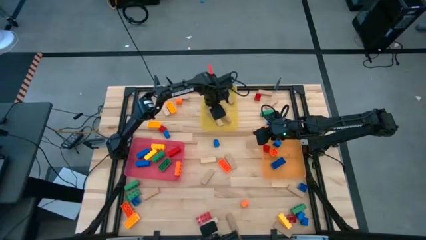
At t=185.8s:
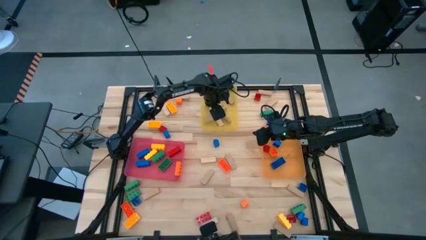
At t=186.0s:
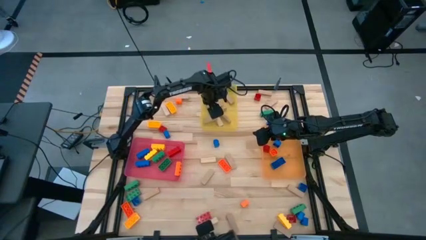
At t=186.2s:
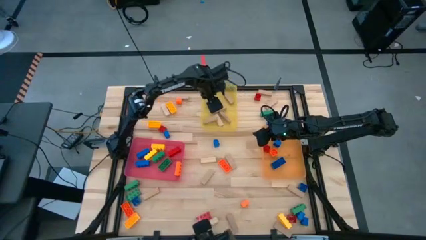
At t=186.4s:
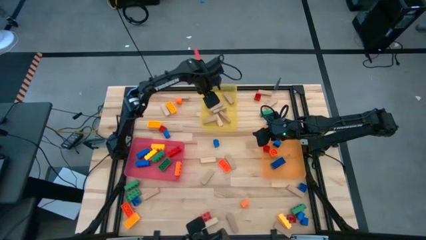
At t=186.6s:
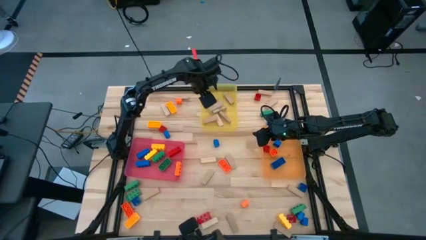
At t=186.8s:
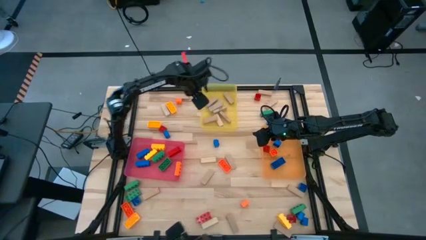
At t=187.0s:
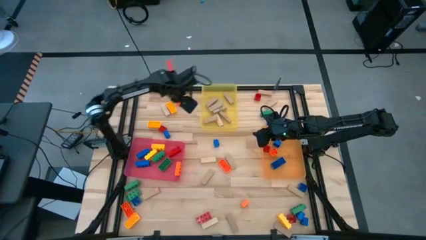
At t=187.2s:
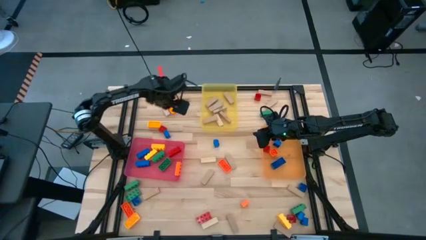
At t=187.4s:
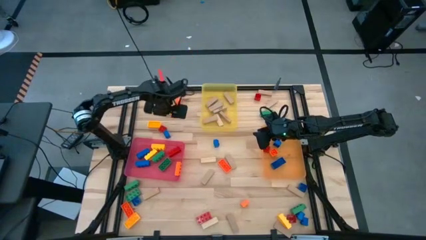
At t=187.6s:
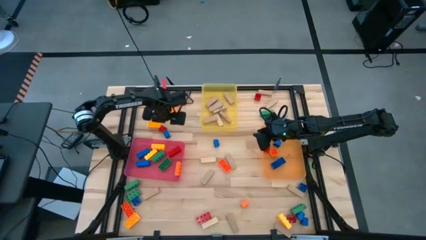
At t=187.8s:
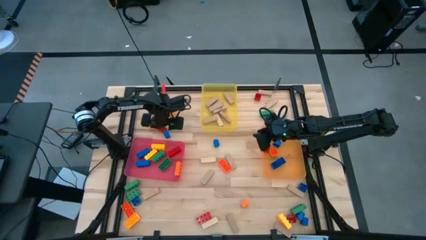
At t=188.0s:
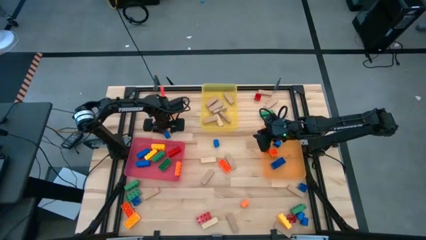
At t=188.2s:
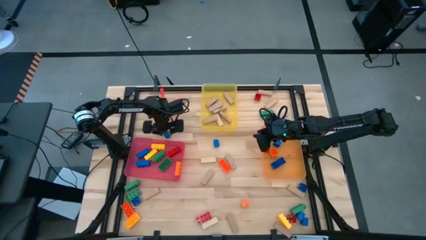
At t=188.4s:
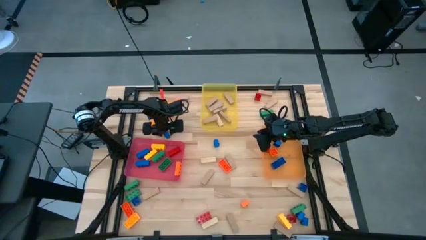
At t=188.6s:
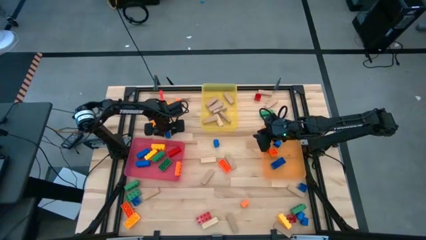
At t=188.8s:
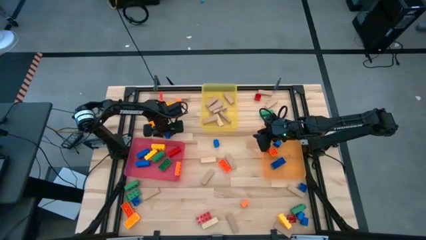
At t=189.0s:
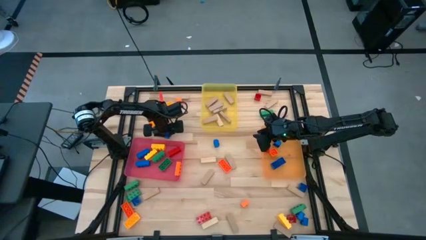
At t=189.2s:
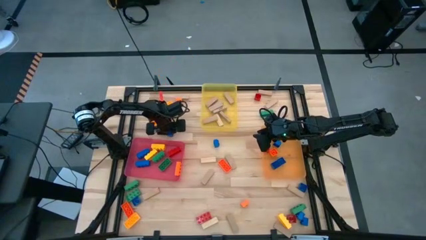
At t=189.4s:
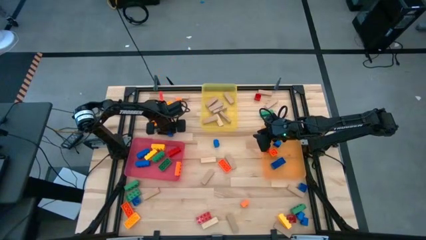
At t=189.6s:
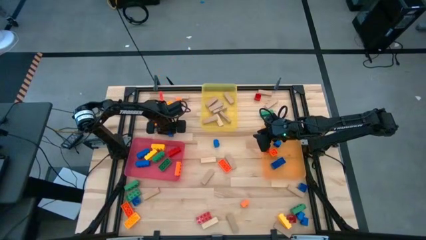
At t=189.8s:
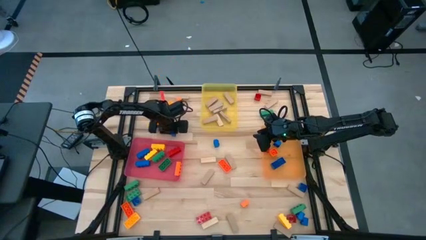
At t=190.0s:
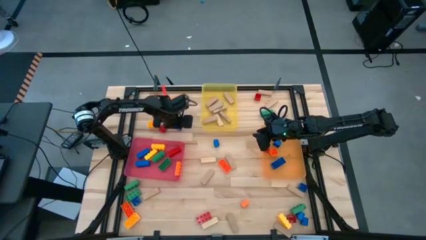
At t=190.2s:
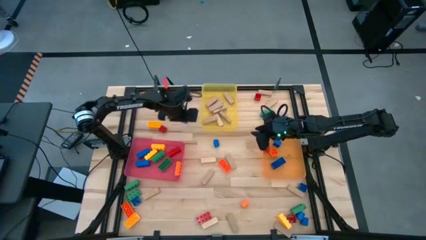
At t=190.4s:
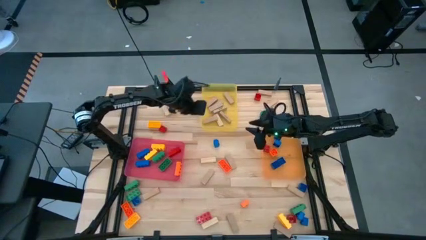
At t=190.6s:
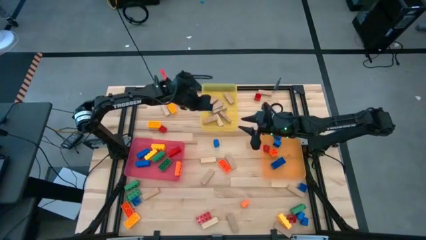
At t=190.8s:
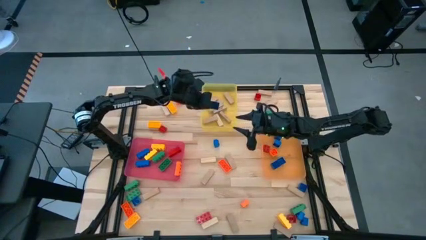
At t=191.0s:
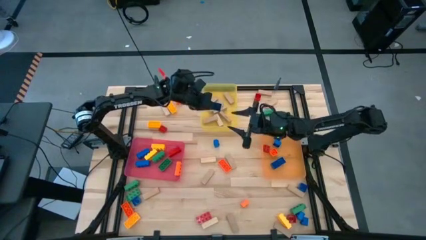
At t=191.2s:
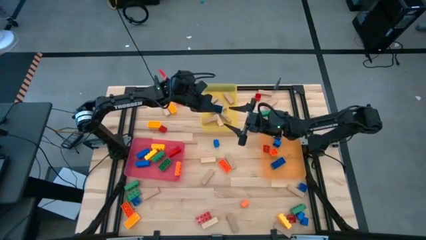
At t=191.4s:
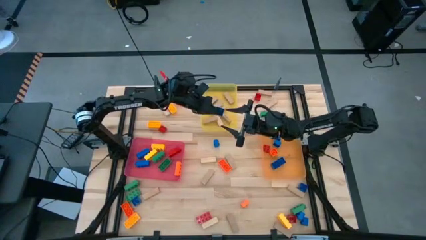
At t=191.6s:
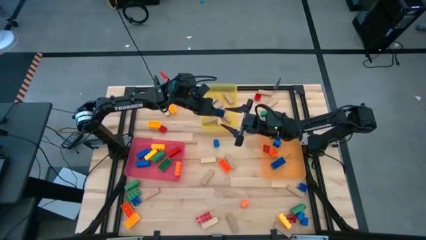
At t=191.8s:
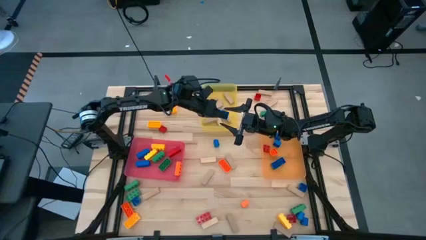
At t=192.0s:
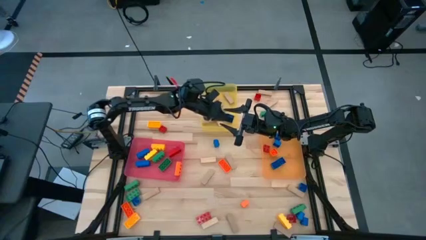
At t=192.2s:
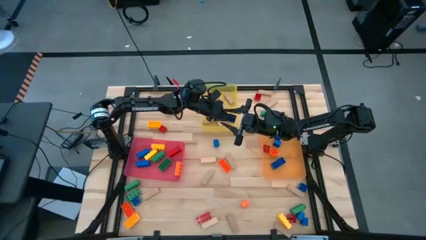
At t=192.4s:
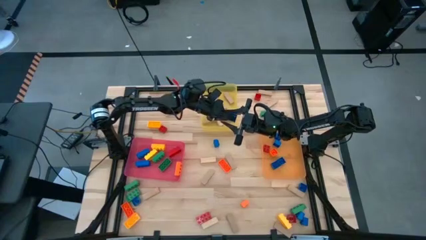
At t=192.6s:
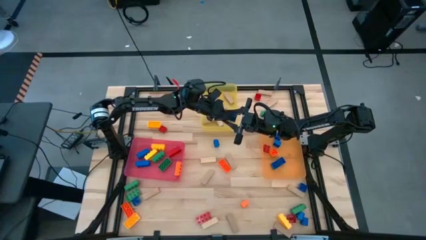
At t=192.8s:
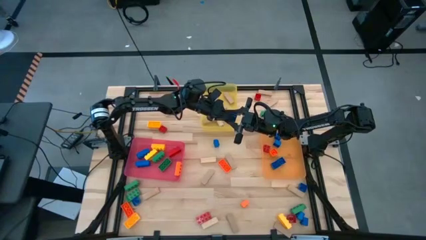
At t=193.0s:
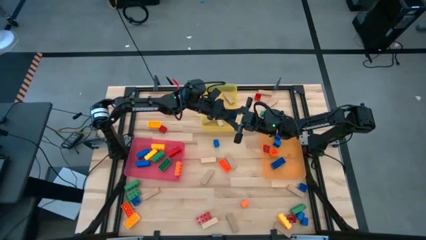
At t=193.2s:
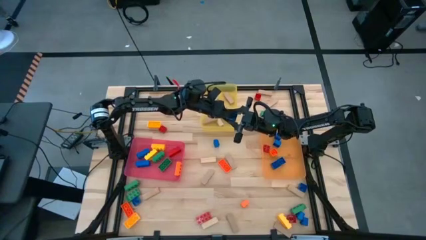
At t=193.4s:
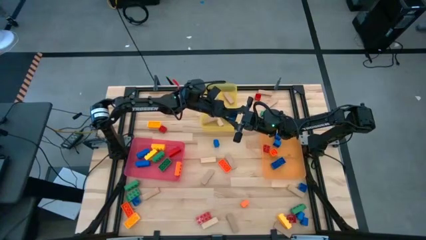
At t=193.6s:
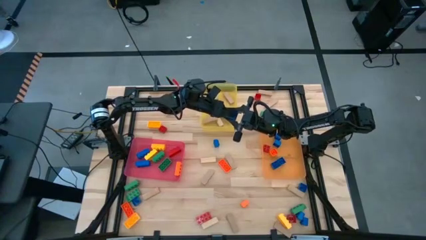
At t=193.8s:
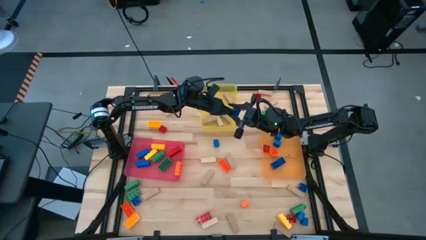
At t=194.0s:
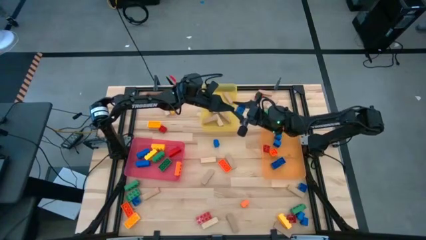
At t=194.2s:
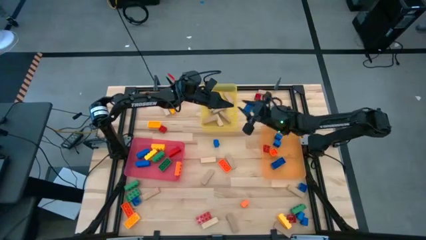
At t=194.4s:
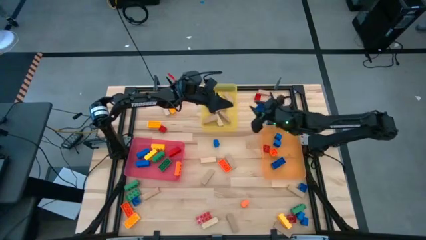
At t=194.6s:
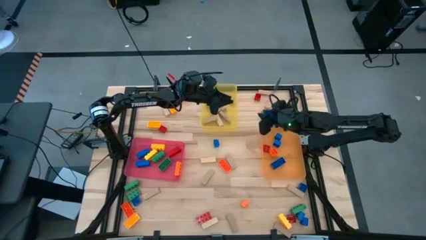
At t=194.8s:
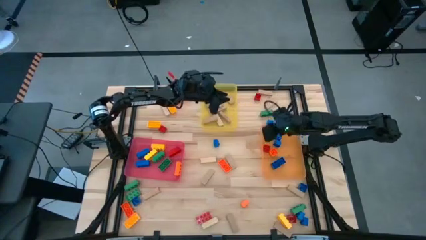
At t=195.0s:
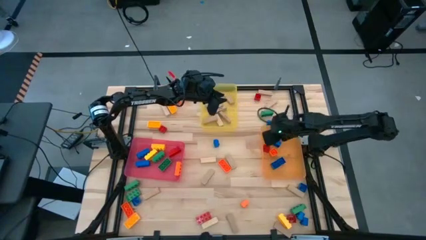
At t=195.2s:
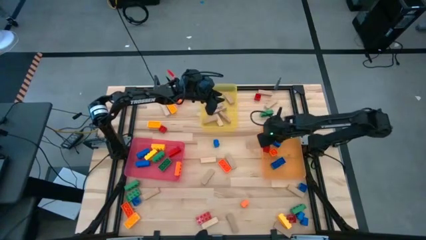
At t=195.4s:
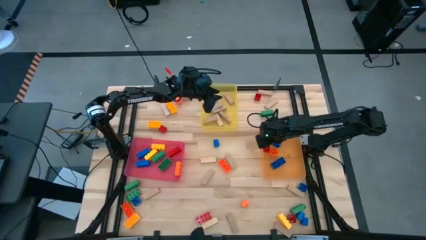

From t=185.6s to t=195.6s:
Task: Sort blocks by size
Put the 1 stud blue game piece into the orange bin

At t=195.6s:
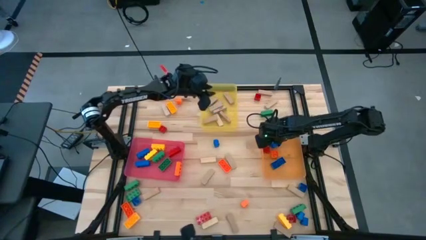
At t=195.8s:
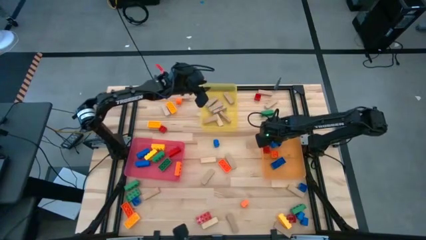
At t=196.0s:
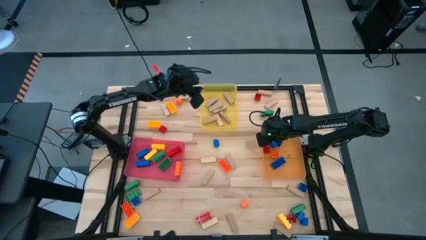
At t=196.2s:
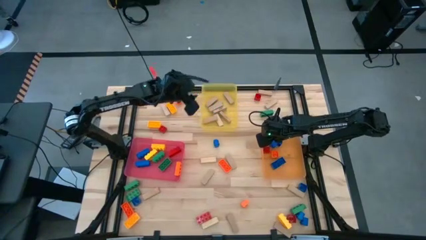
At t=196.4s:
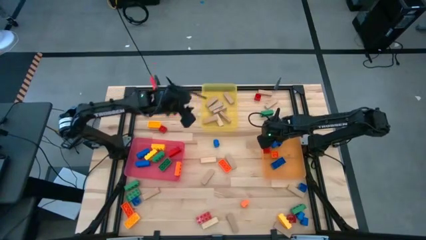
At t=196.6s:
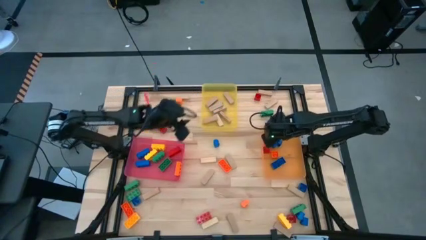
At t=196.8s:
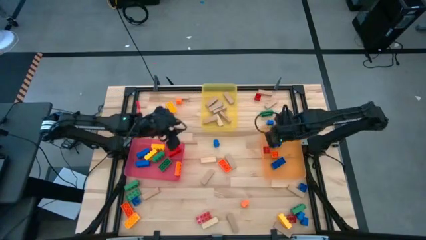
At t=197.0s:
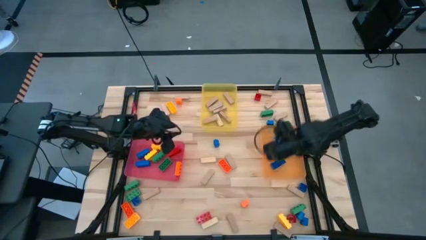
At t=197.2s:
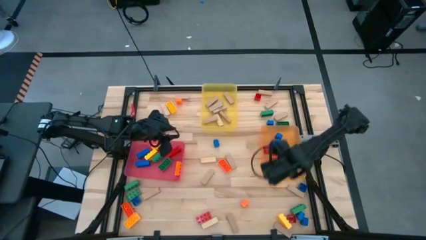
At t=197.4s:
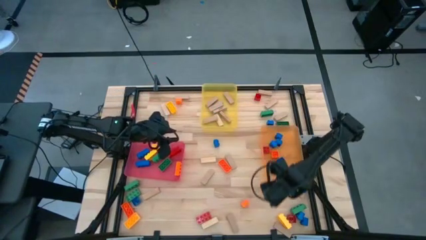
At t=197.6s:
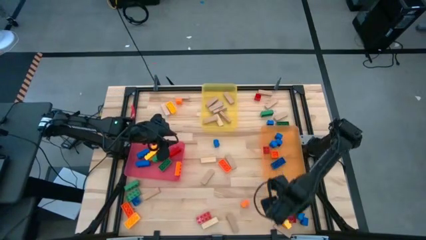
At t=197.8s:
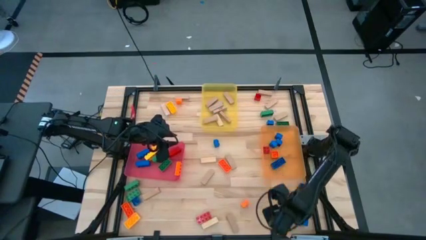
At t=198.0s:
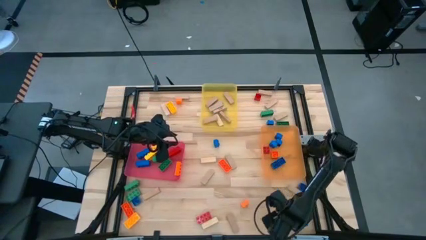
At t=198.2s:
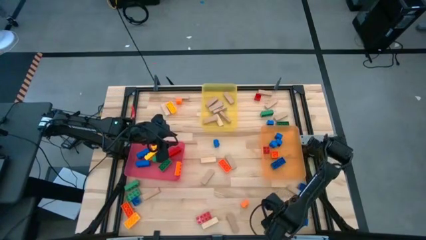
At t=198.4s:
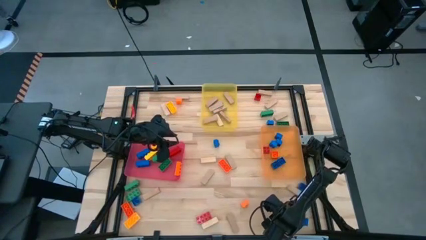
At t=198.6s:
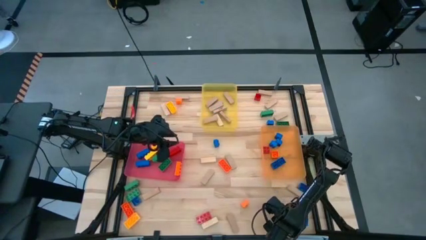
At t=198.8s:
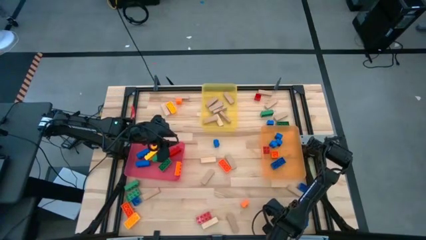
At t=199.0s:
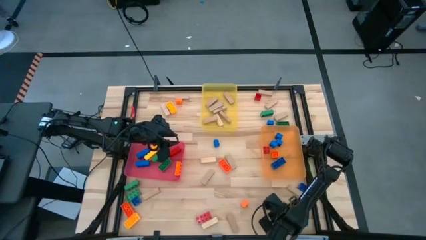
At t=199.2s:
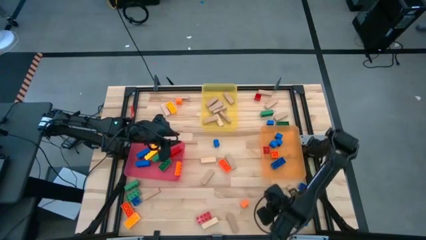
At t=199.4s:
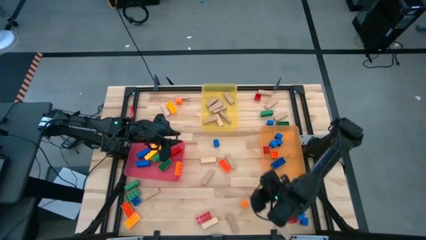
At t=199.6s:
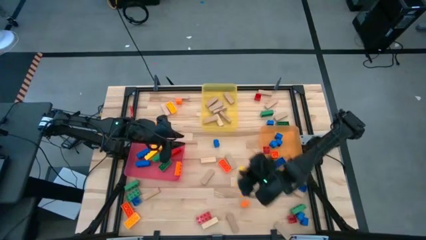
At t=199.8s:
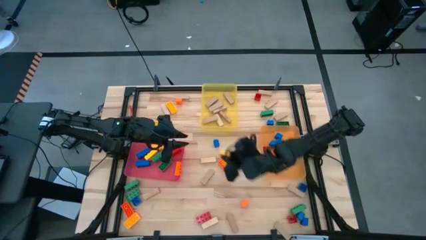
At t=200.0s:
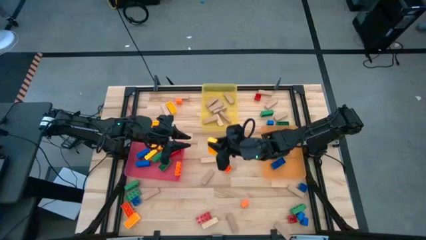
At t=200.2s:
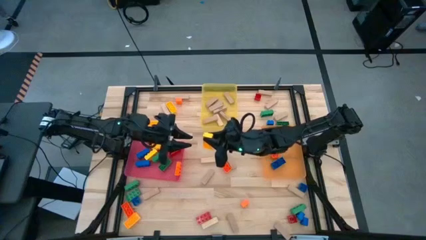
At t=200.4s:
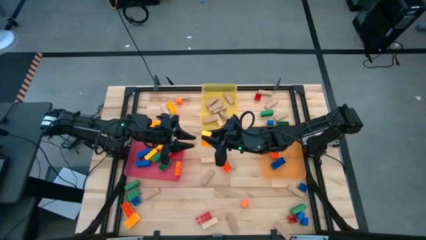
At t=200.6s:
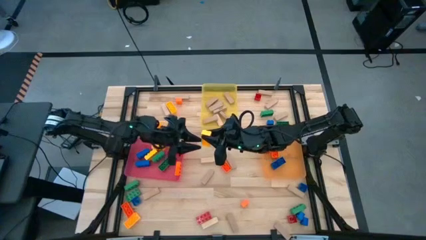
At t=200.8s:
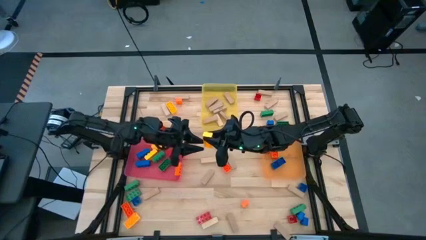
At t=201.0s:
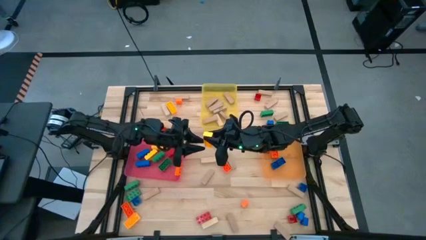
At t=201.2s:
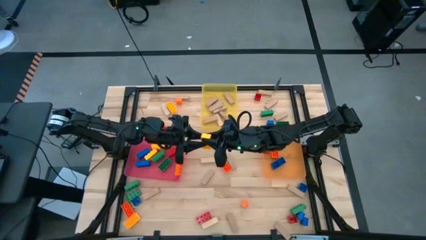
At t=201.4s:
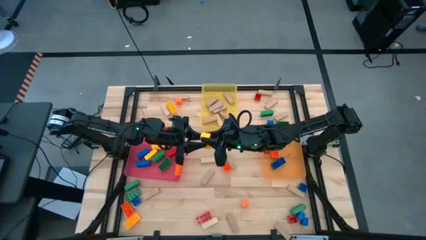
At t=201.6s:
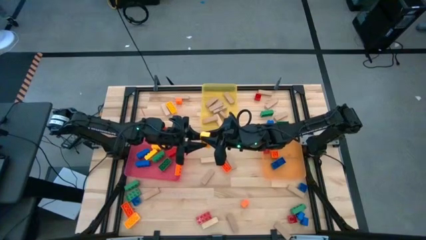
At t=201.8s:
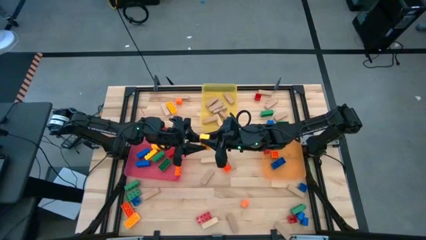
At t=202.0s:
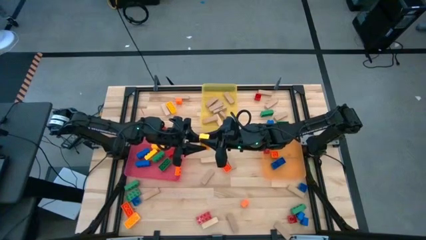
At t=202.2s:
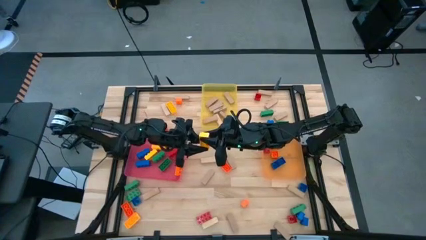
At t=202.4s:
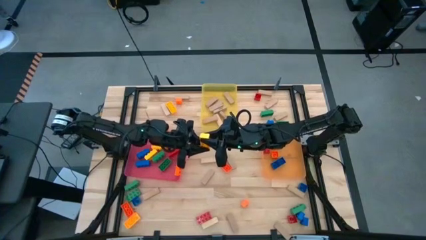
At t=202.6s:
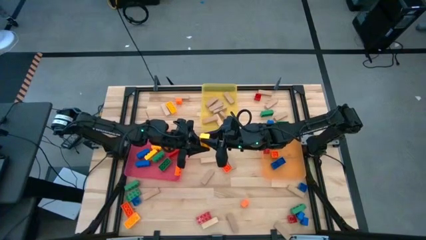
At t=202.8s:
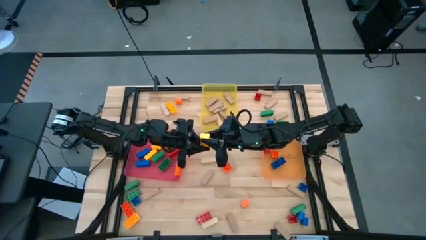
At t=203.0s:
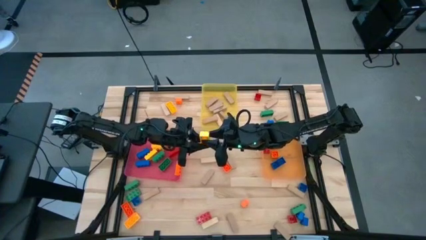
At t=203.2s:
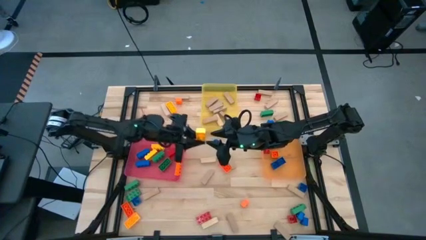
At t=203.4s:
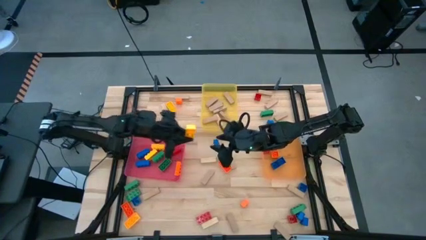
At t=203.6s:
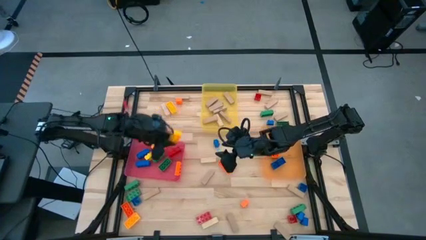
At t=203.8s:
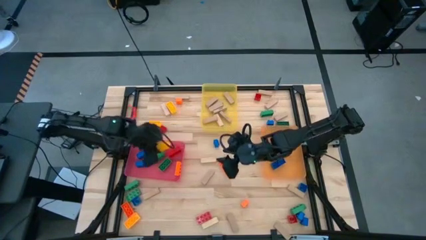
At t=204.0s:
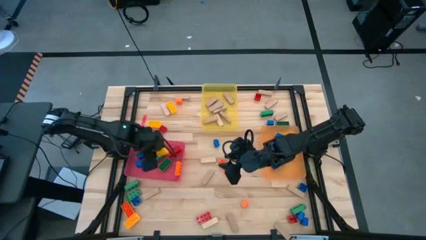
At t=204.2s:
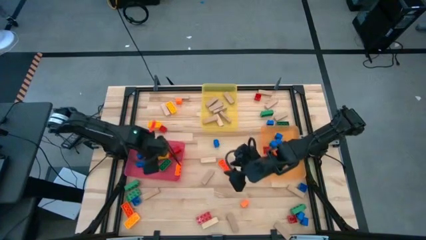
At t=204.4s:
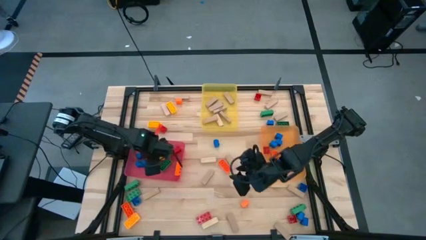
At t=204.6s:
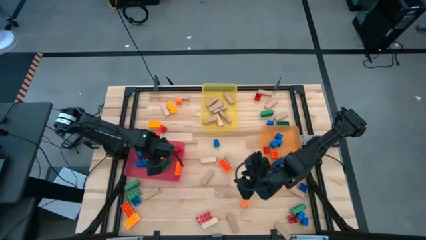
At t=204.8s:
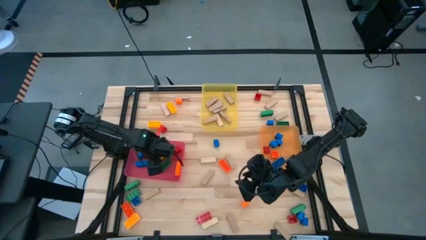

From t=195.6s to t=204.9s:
Put the 3 stud yellow game piece into the pink bin
